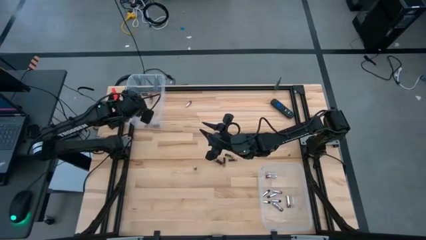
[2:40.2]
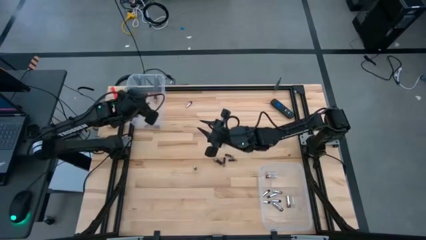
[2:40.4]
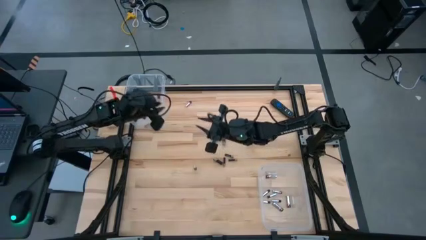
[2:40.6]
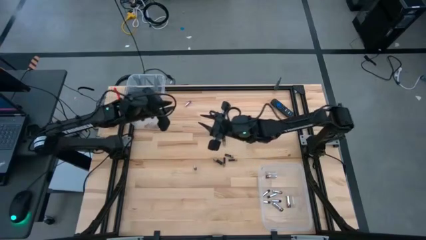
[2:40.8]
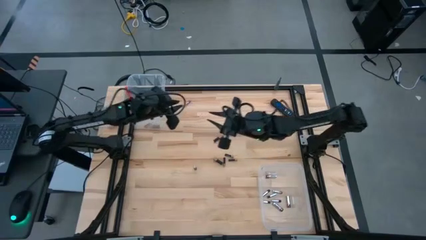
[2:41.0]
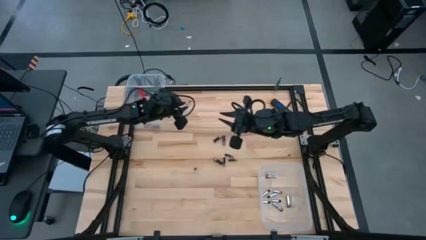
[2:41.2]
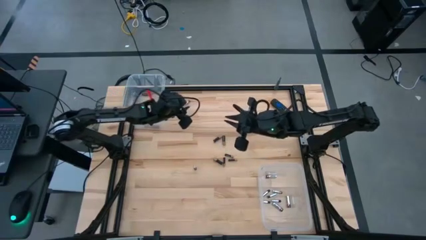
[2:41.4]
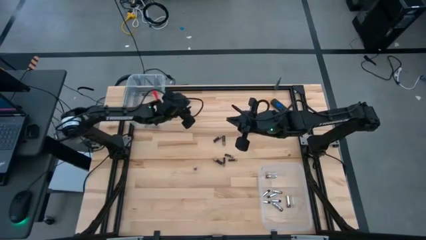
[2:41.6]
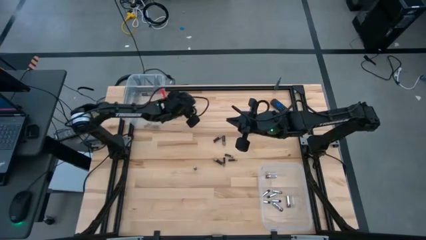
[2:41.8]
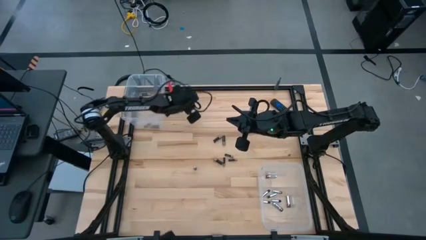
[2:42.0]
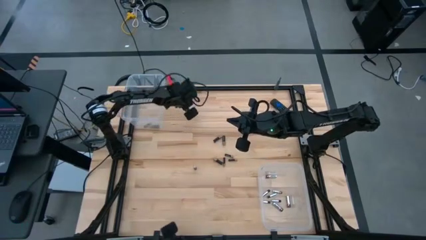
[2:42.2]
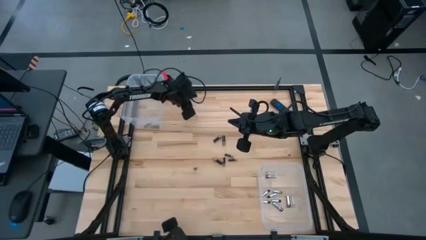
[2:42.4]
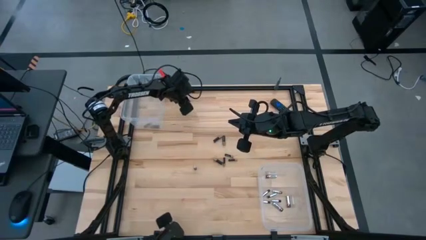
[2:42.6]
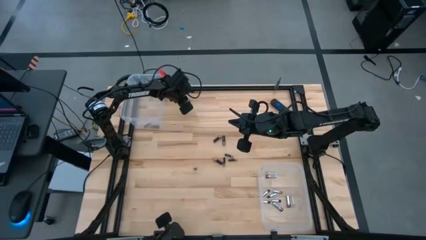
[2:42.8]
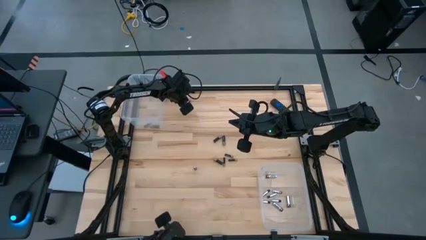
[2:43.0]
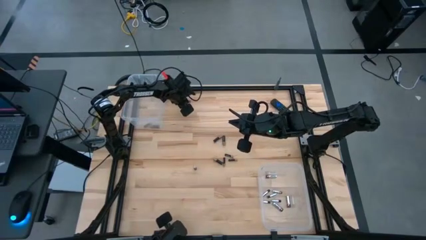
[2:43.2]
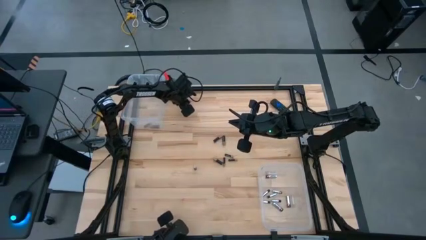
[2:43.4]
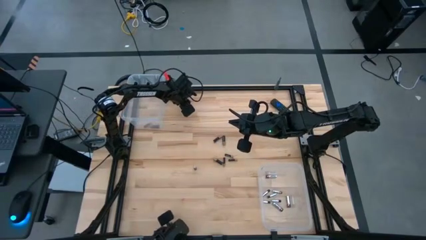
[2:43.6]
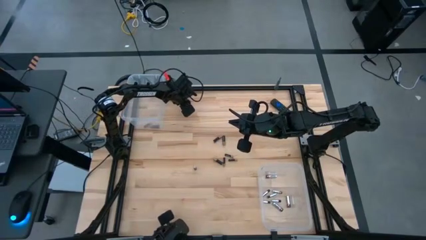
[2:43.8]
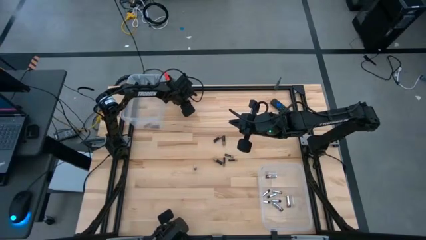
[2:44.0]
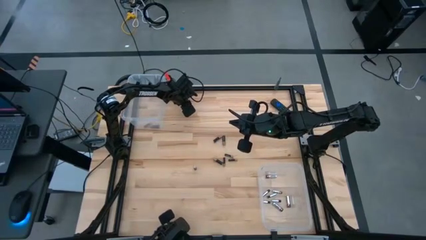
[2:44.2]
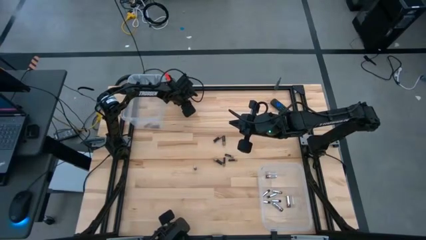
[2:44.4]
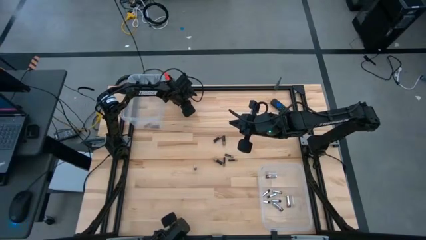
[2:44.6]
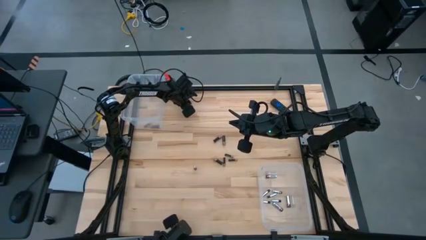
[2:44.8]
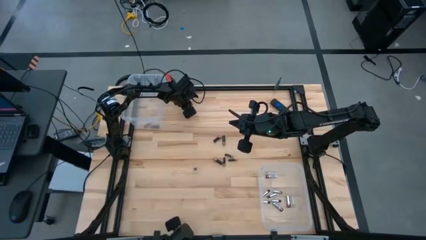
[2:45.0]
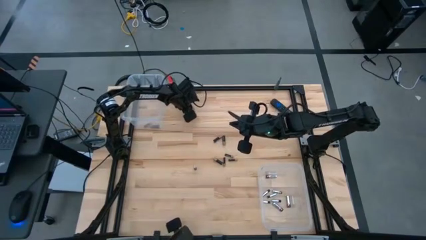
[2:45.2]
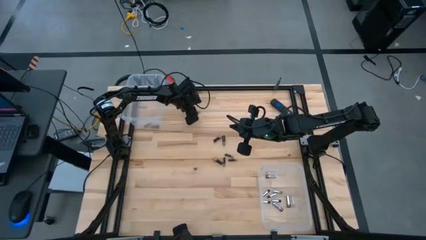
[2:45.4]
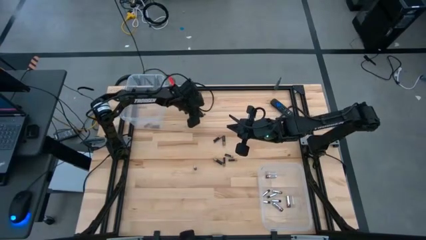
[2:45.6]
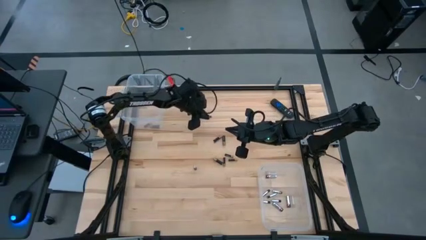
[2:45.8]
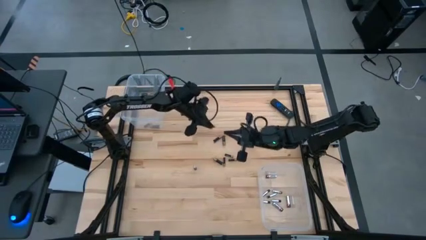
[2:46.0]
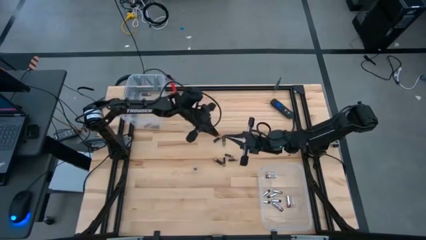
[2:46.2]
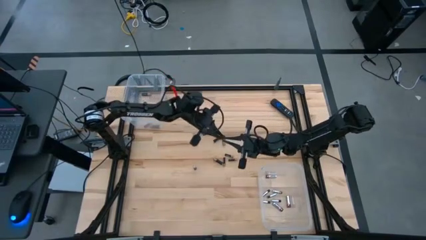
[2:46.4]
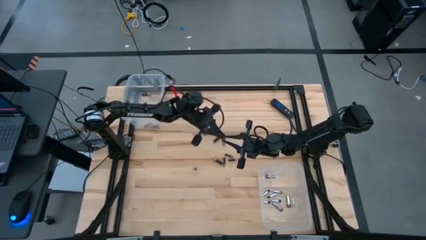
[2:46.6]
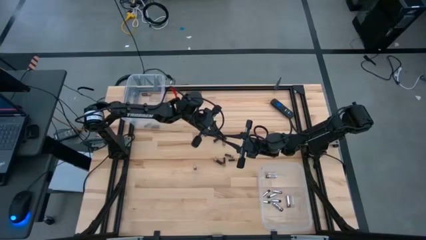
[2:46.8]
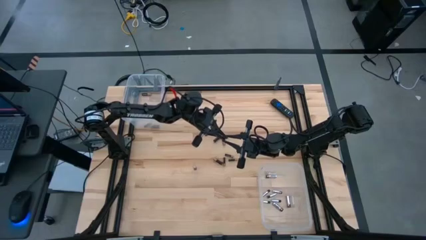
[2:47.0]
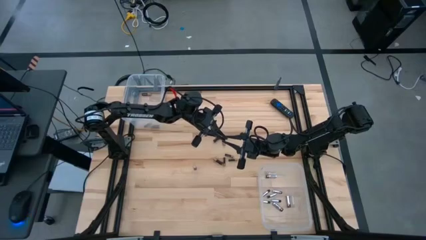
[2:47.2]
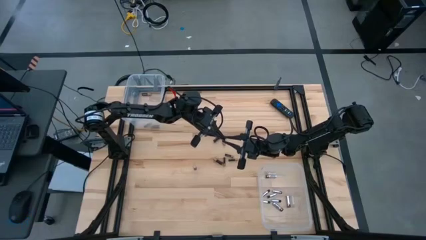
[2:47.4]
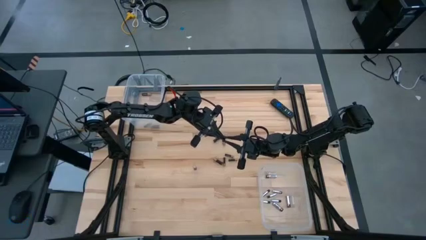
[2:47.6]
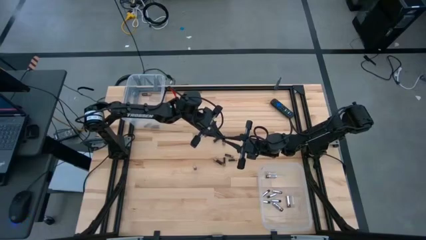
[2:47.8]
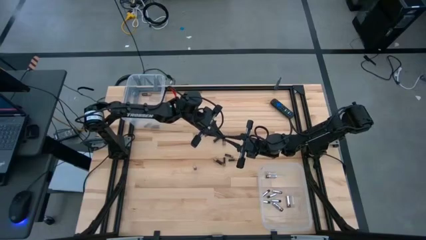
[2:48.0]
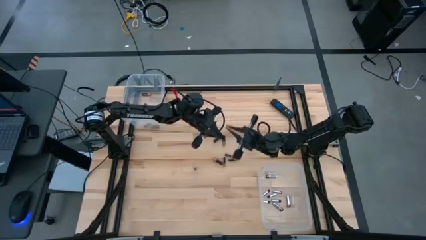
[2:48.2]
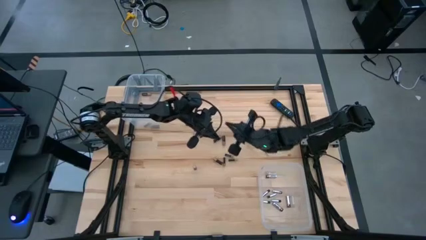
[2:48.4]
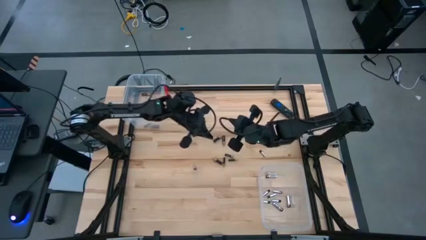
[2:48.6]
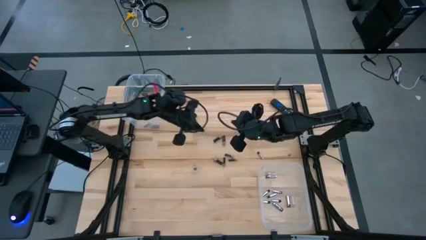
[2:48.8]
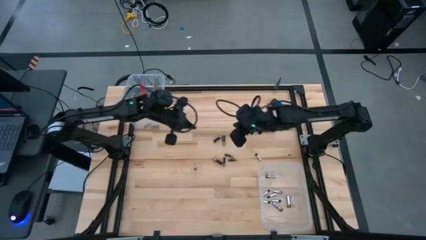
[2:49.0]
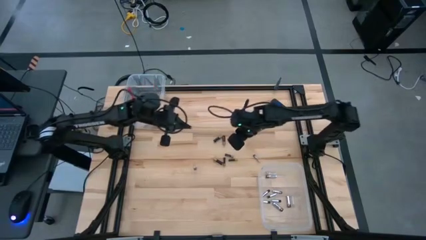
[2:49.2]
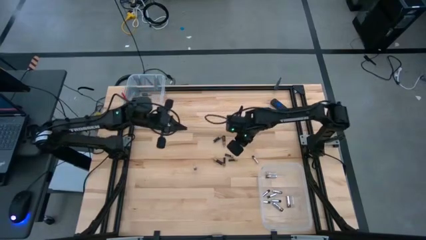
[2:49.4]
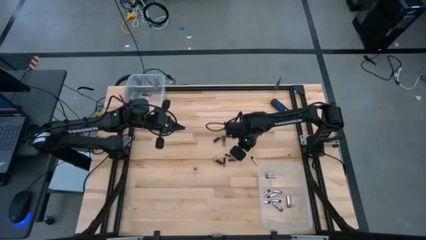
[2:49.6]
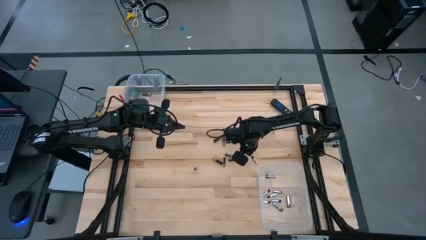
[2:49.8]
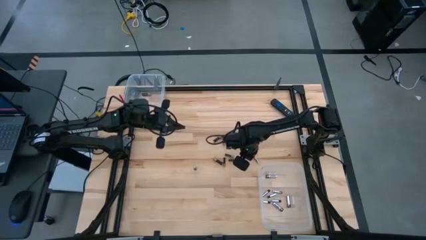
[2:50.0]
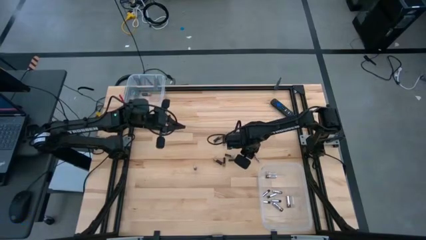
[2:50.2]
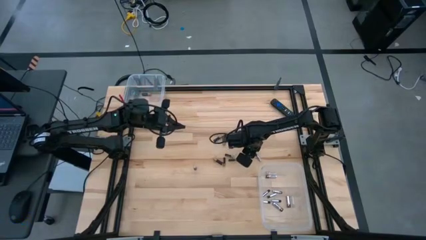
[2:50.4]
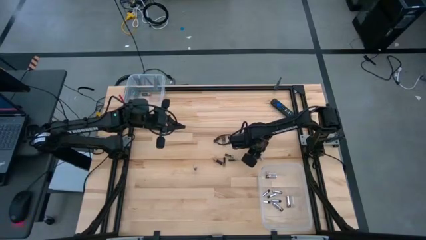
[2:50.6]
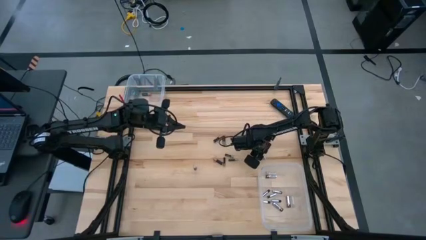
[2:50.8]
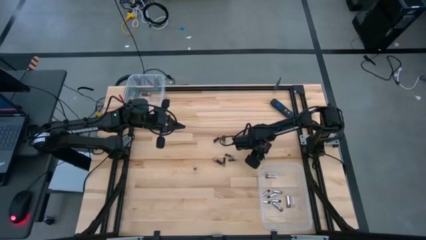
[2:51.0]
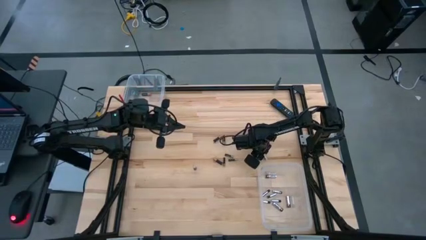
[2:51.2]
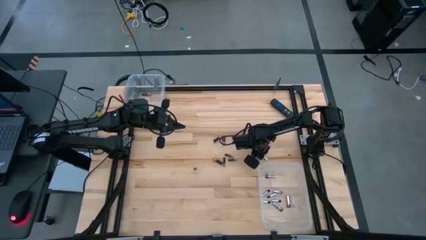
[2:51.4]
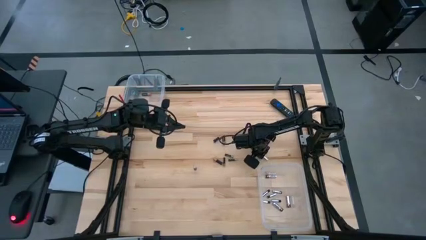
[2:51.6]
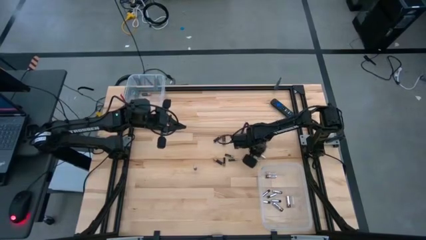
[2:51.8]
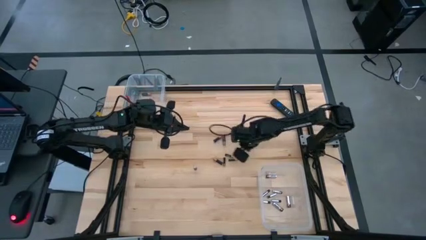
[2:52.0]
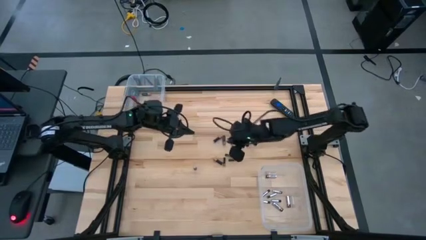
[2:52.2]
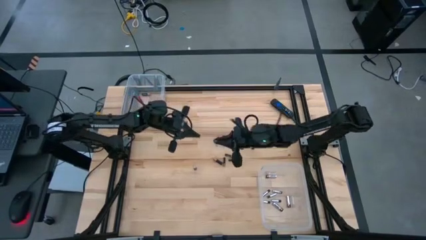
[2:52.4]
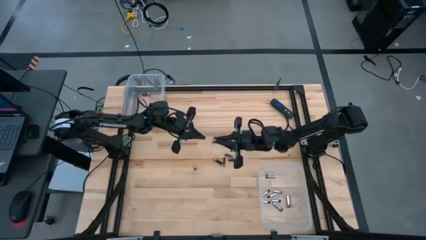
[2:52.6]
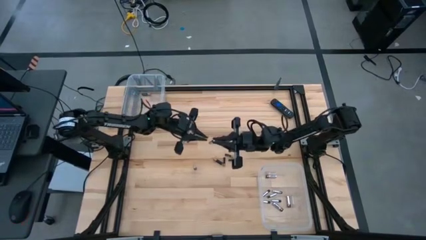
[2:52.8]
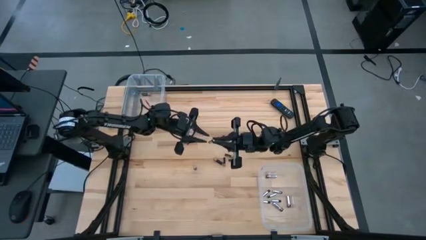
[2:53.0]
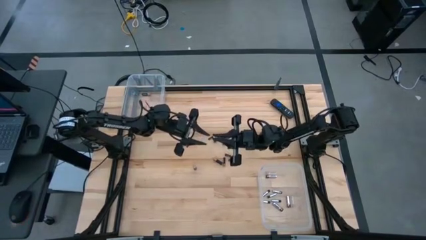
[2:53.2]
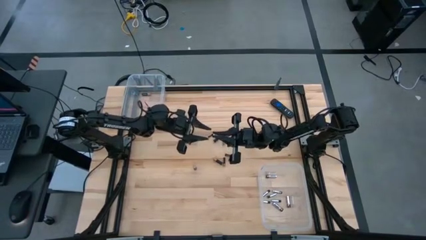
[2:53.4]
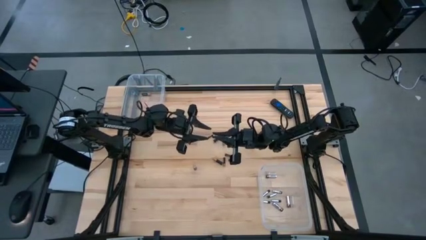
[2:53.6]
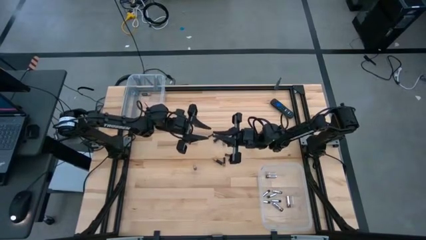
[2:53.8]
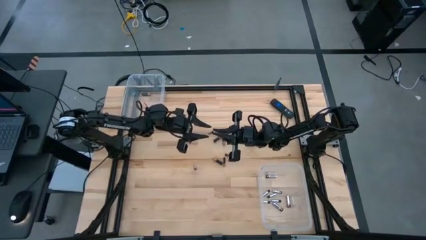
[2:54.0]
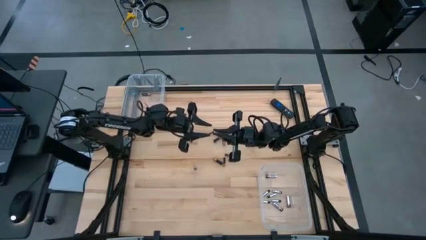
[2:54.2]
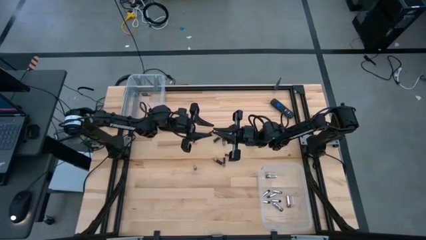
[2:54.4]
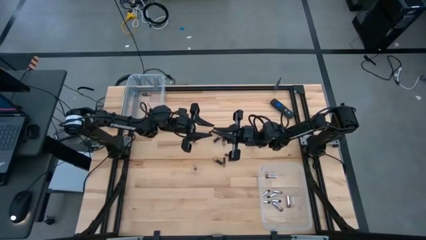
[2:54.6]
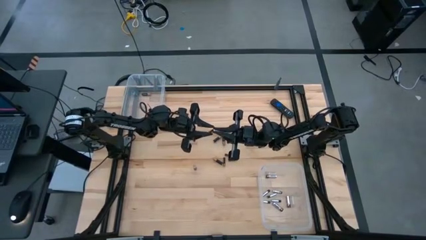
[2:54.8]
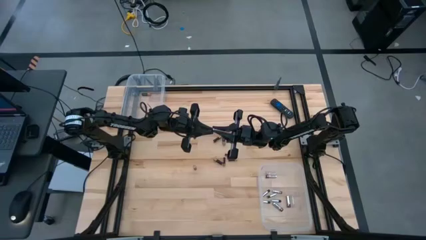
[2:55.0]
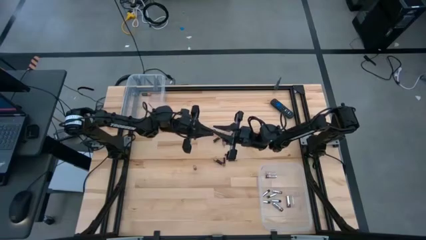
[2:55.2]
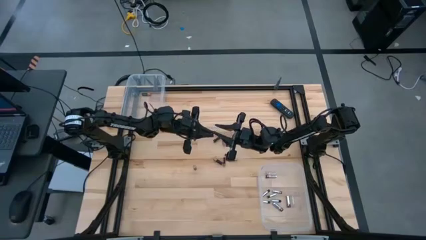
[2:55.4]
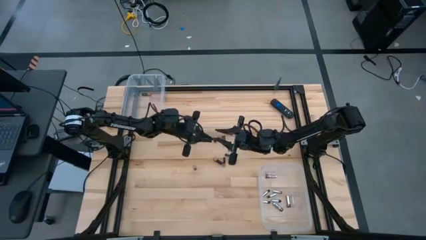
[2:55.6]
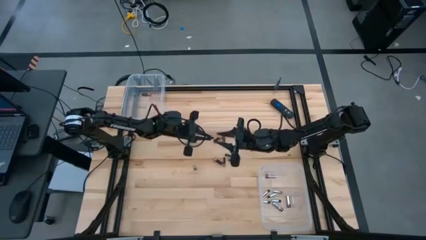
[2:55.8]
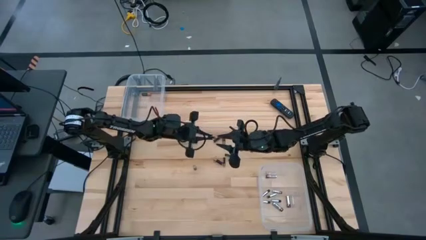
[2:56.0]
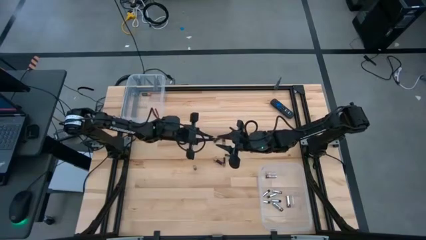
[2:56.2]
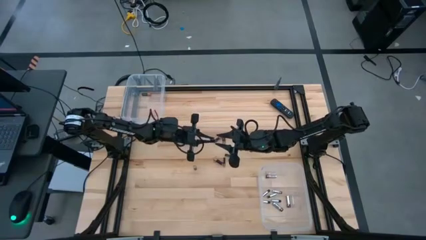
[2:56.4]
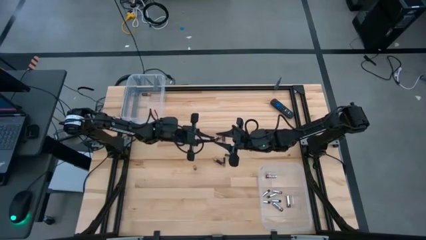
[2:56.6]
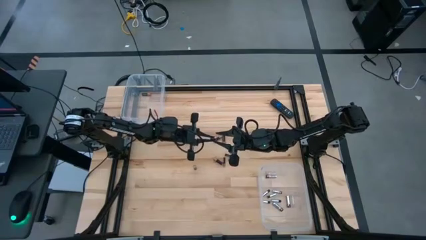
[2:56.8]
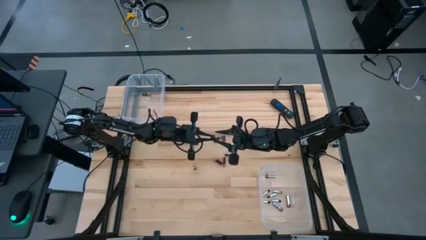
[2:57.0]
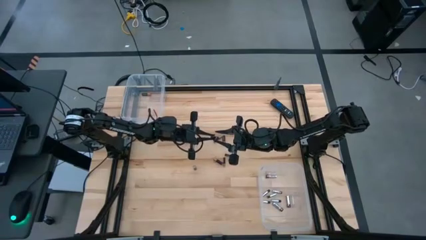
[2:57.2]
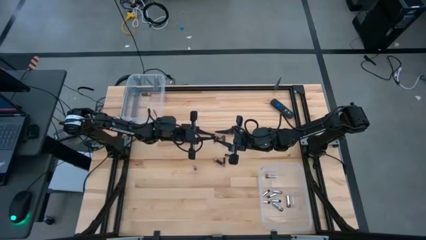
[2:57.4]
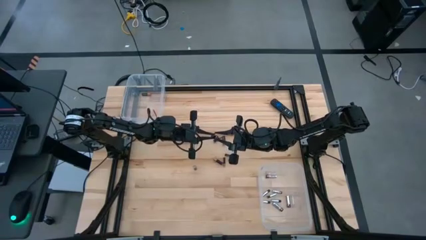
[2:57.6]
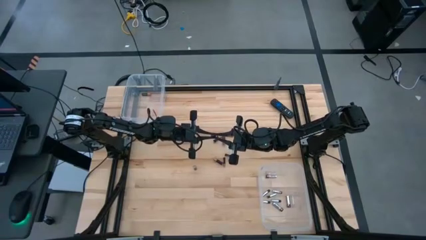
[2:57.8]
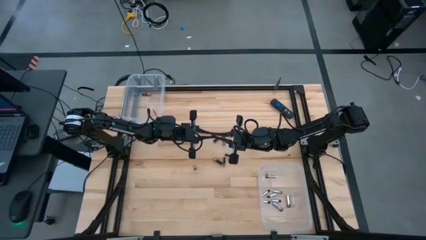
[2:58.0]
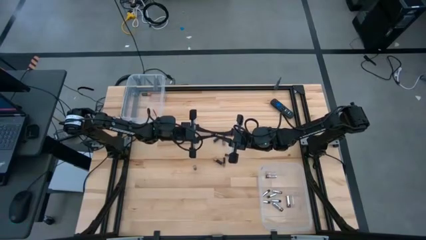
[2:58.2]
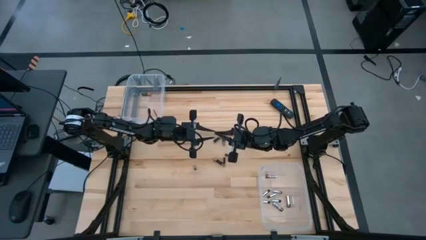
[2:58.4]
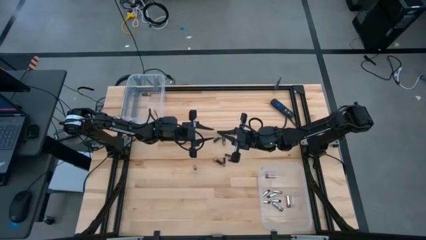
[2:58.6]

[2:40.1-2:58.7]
Task: Sort batteries
Put the black and silver battery into the bottom transparent bin
